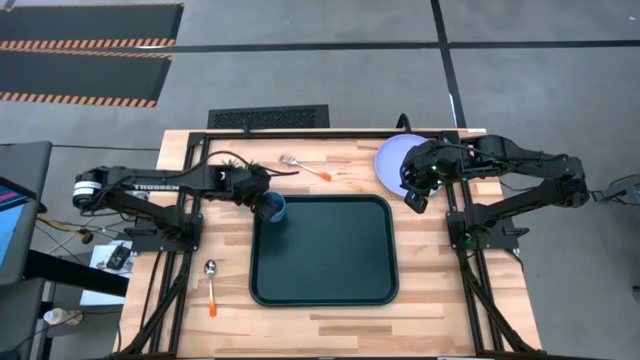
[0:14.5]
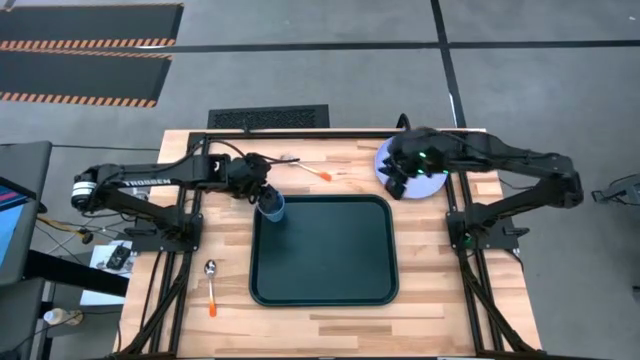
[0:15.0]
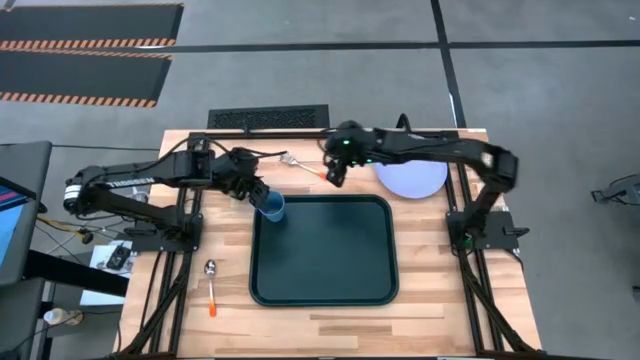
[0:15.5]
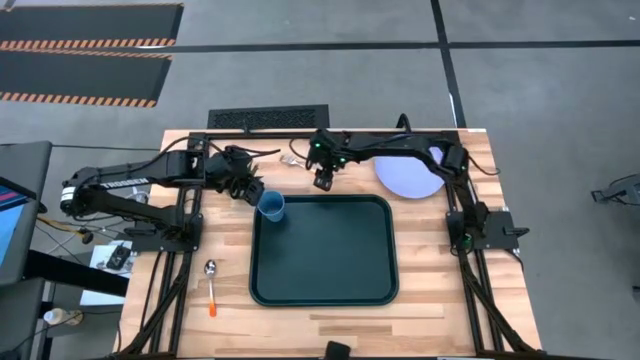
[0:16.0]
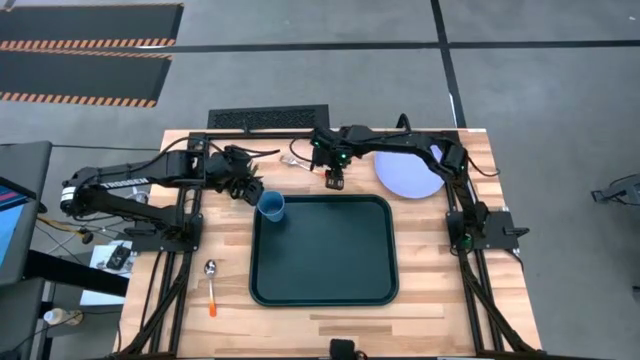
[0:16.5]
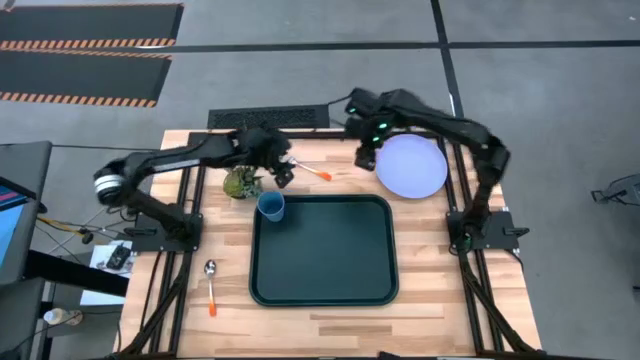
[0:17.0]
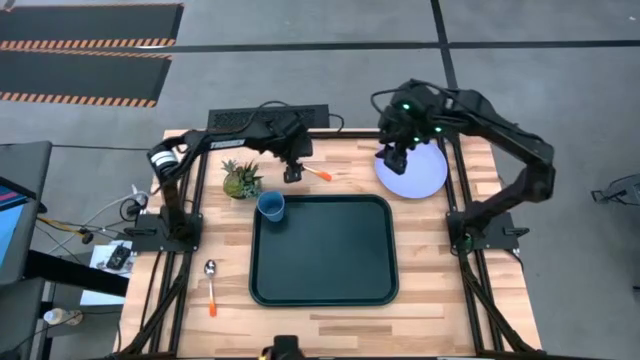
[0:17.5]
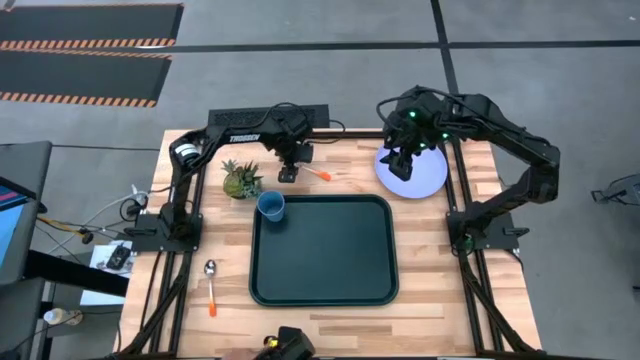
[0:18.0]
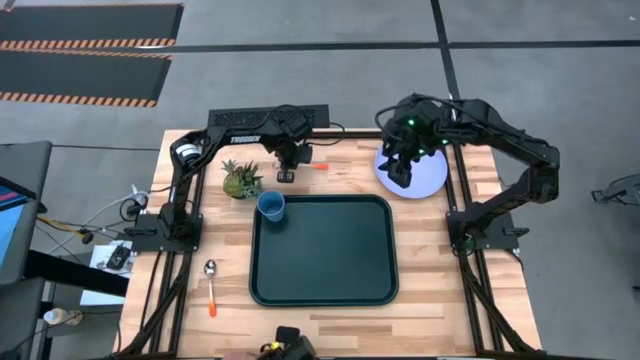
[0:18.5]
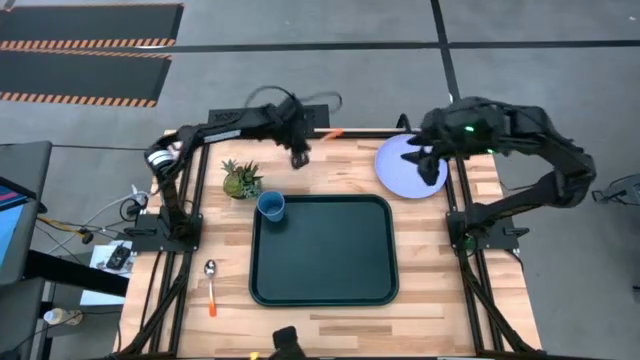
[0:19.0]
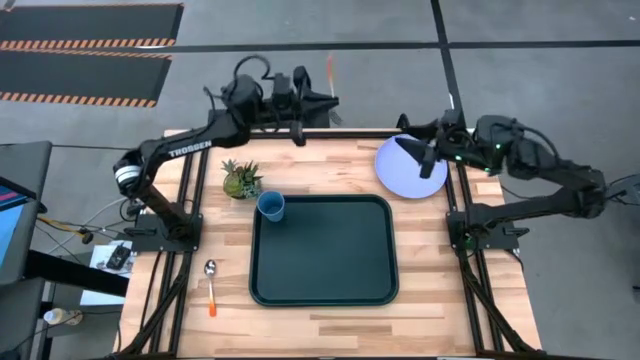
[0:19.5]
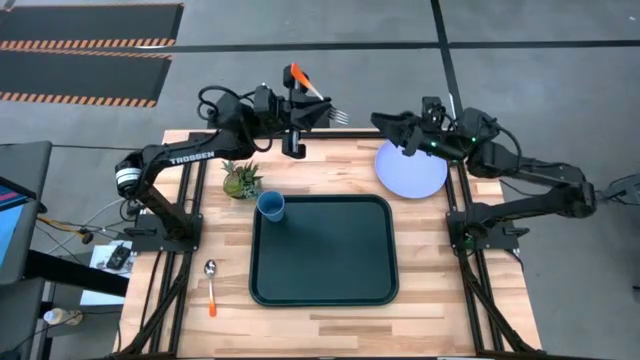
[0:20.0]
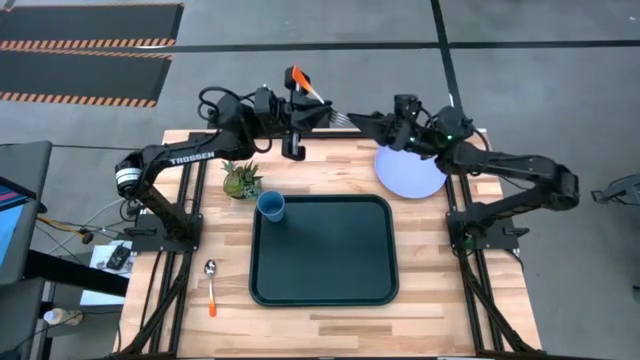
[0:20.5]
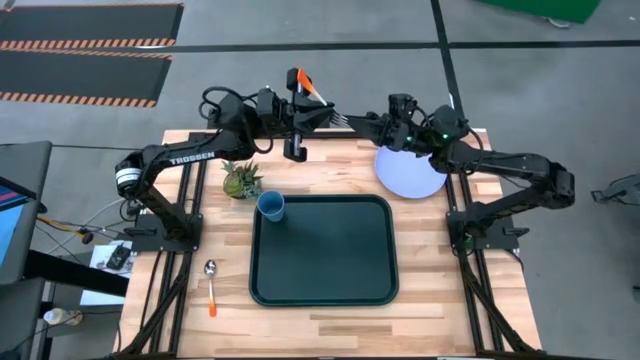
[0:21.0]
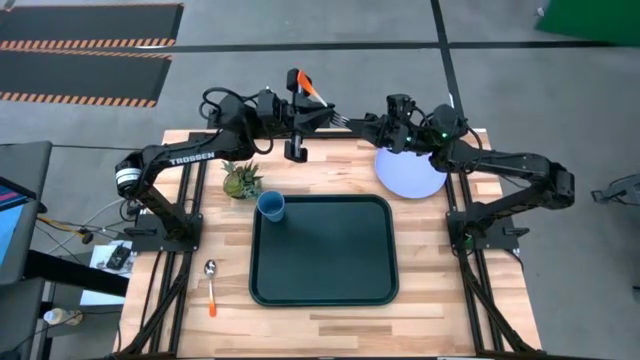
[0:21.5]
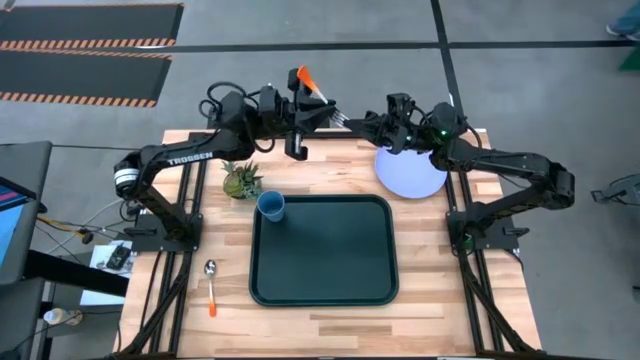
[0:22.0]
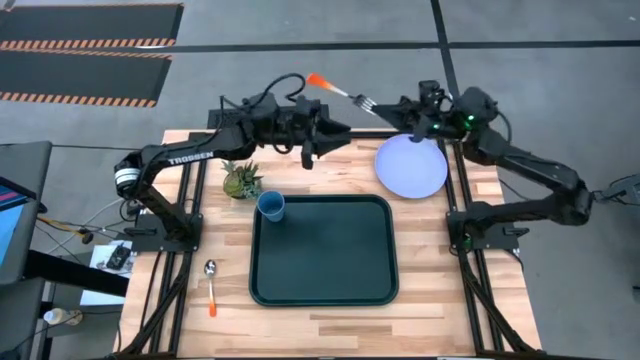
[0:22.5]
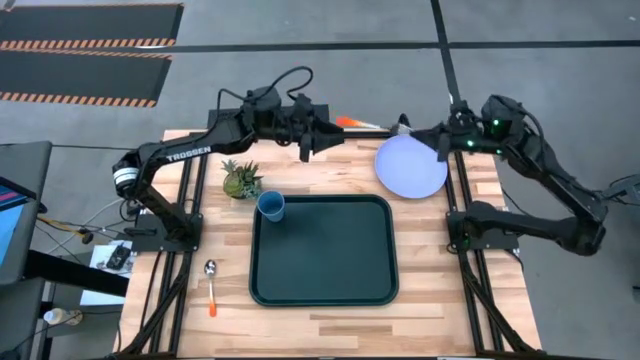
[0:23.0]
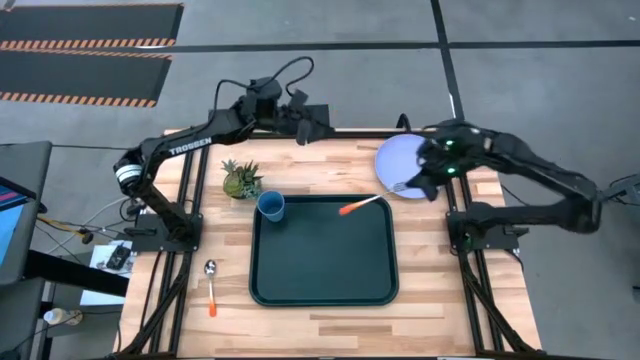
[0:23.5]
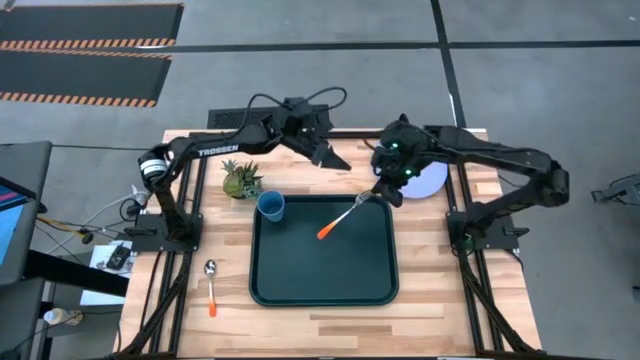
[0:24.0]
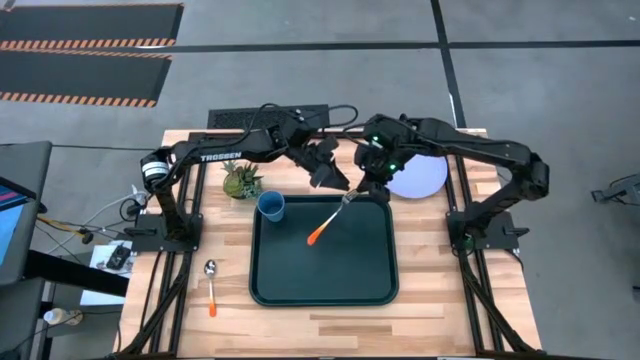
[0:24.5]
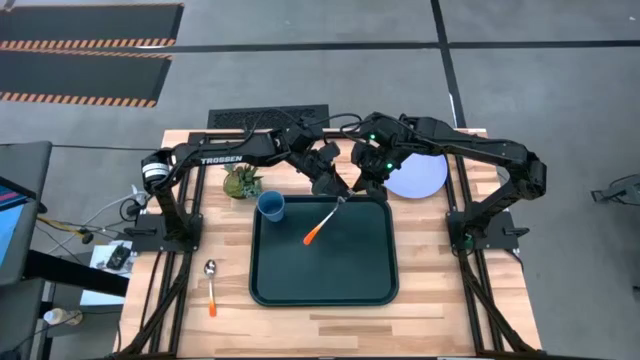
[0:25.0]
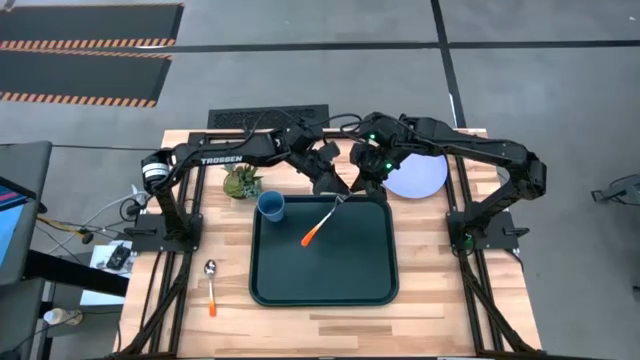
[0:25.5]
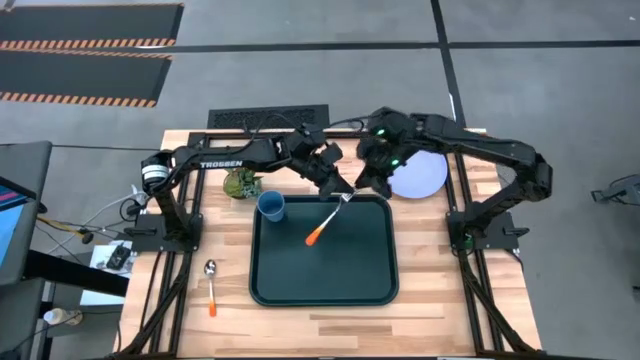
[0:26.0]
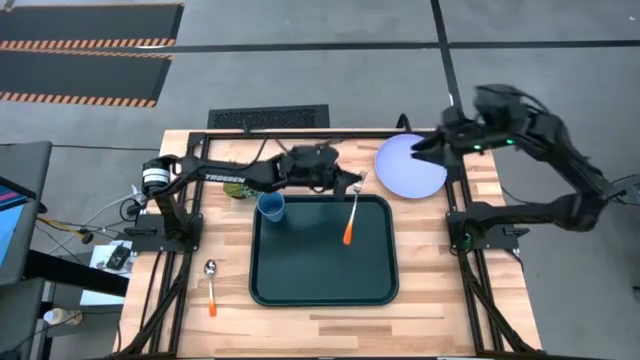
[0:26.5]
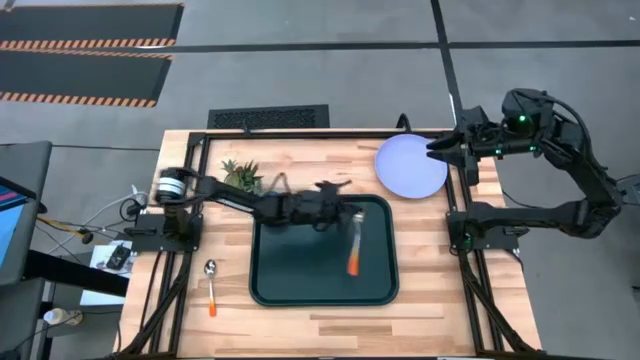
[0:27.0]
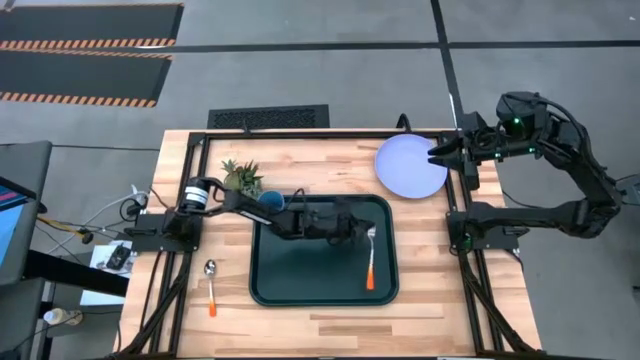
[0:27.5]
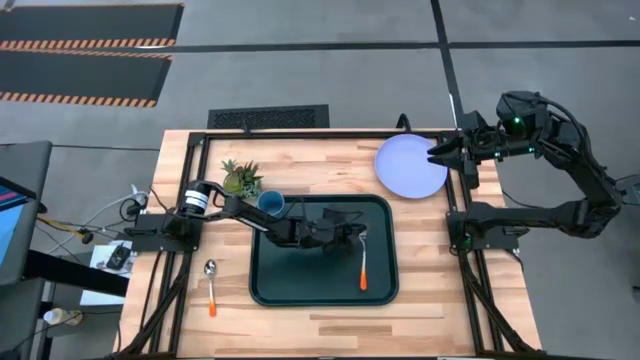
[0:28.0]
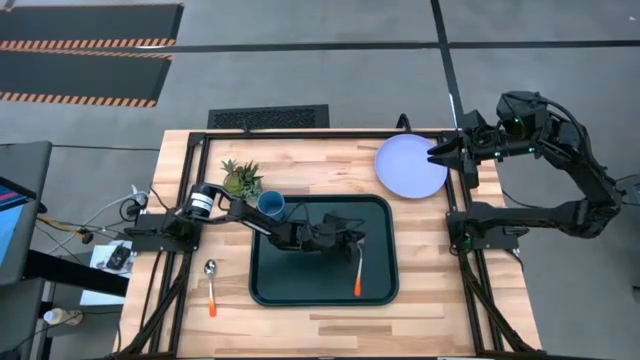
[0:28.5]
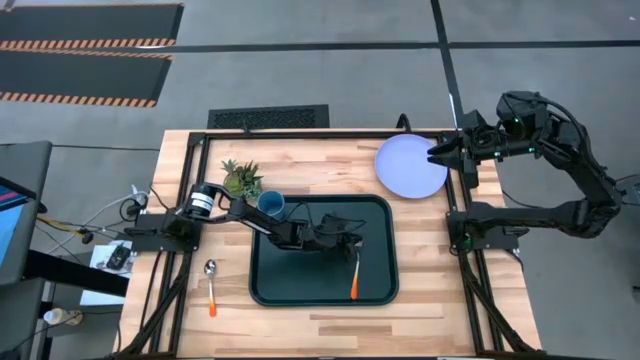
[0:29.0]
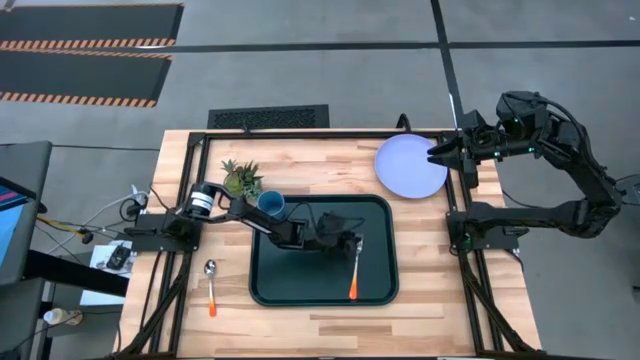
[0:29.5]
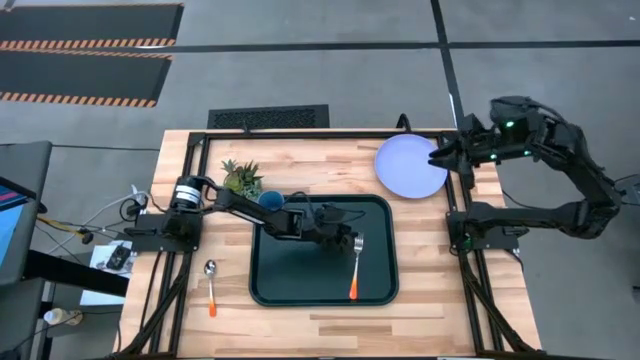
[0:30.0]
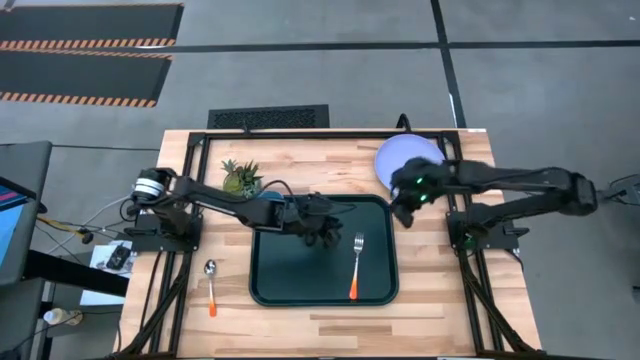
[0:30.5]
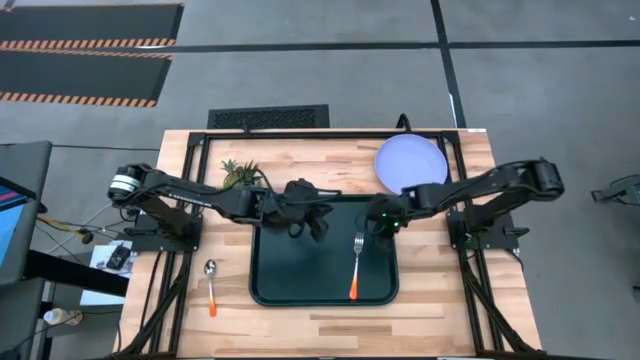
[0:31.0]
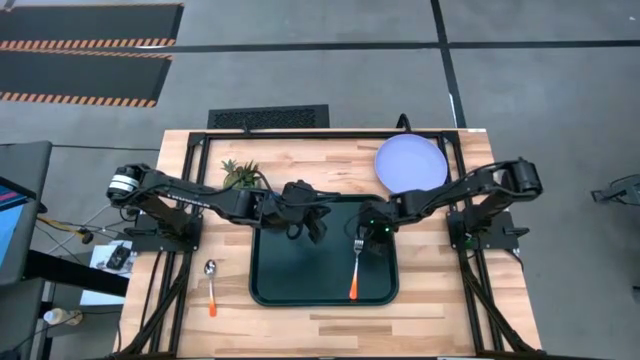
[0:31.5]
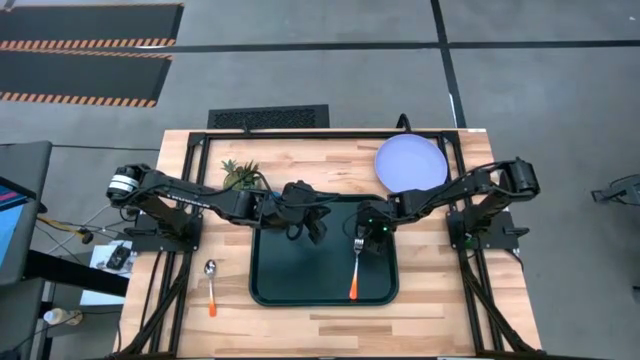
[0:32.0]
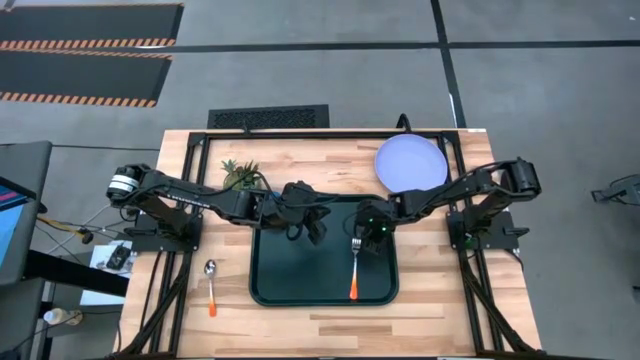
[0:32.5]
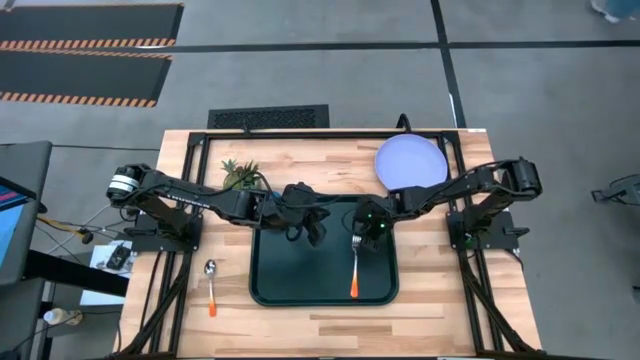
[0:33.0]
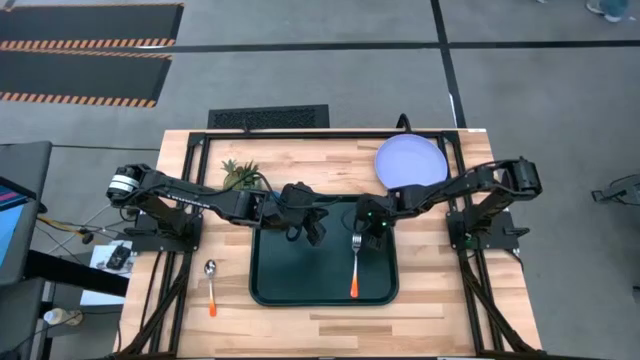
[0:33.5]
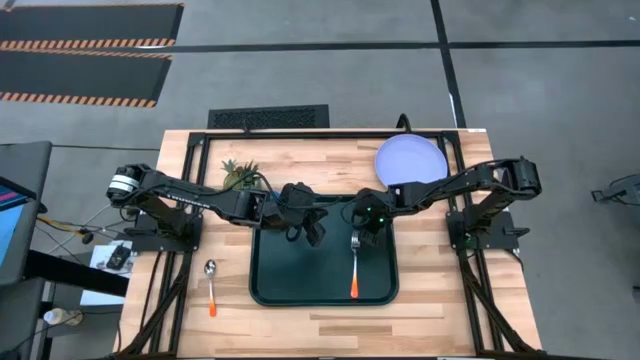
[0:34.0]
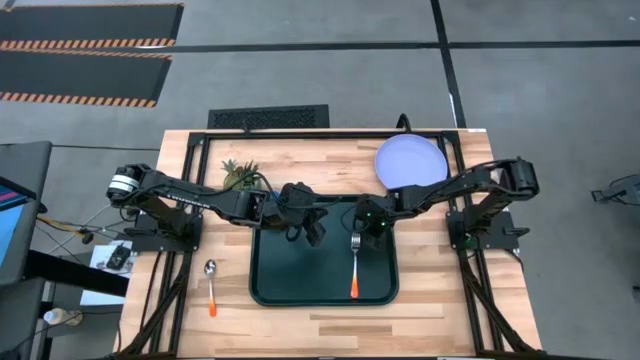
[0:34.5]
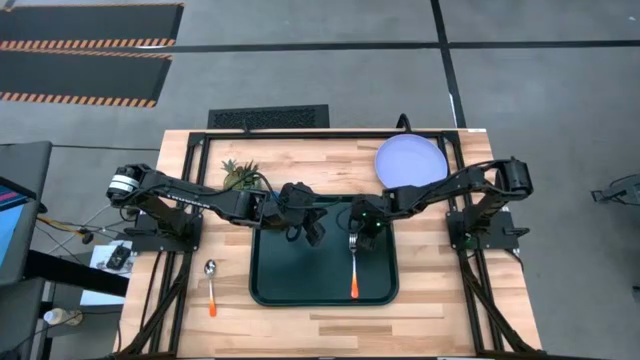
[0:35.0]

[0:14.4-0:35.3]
Task: Pick and place plate/cup/fork/spoon on tray
Put the orange fork on the bottom right of the black tray
